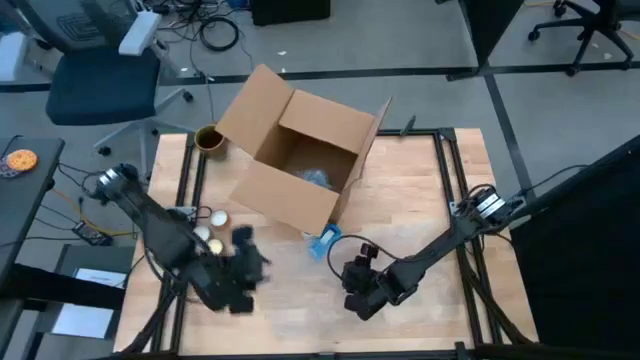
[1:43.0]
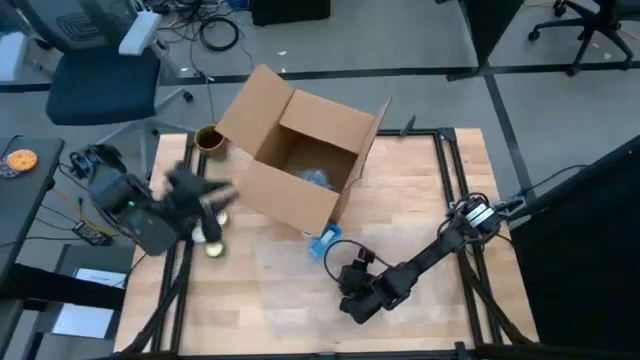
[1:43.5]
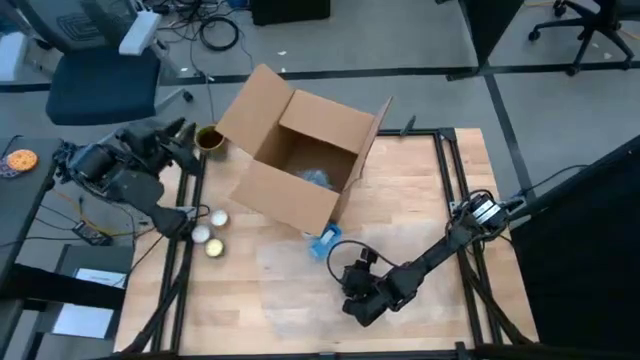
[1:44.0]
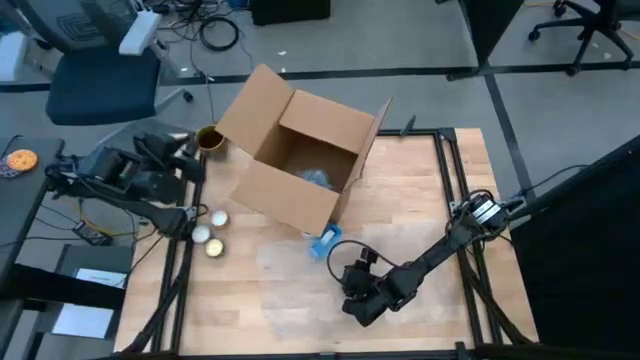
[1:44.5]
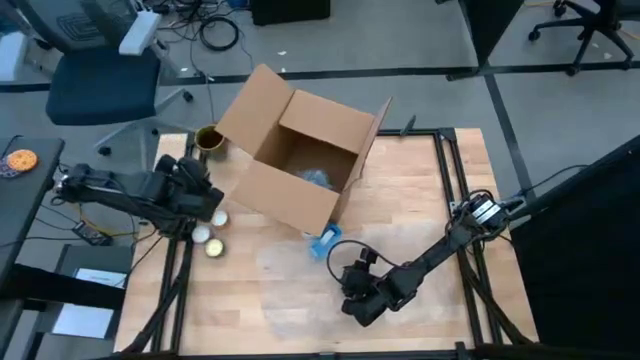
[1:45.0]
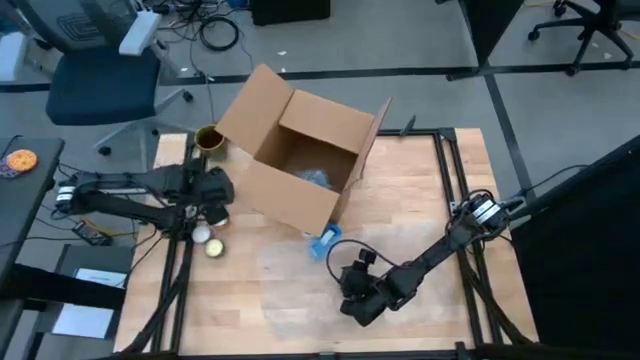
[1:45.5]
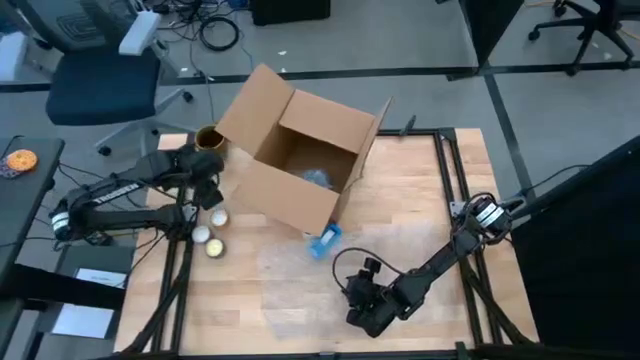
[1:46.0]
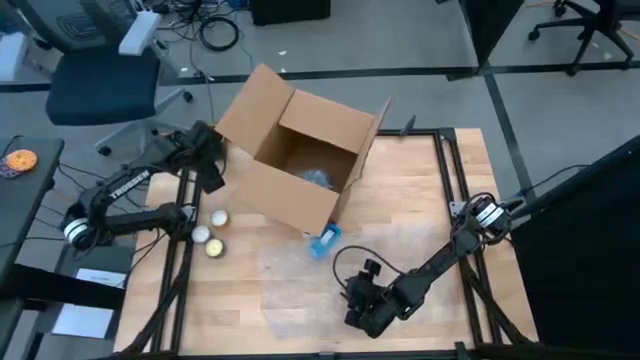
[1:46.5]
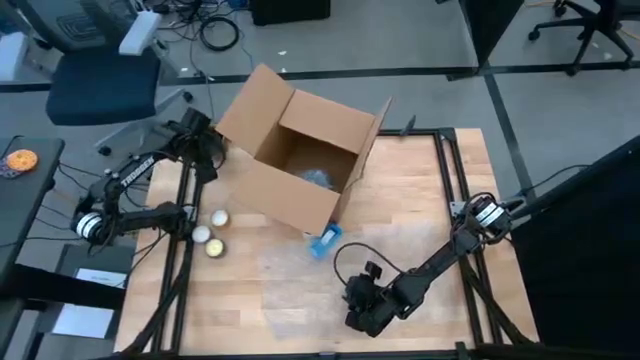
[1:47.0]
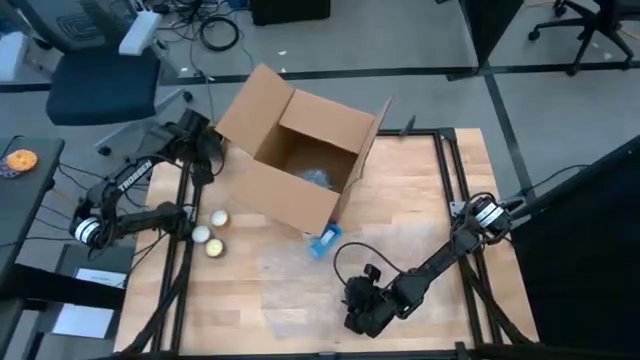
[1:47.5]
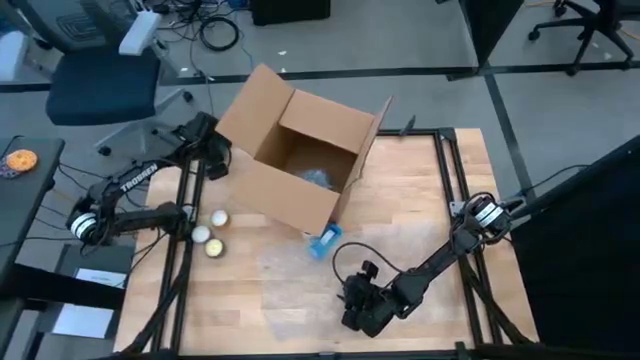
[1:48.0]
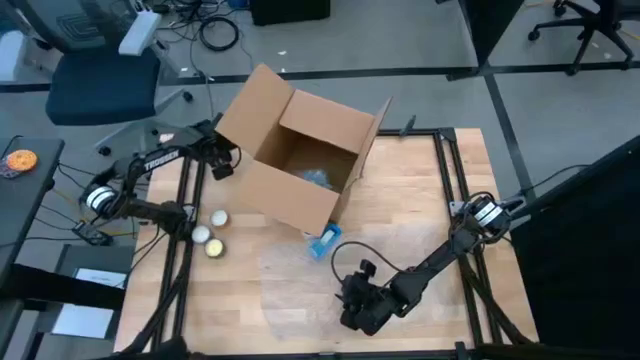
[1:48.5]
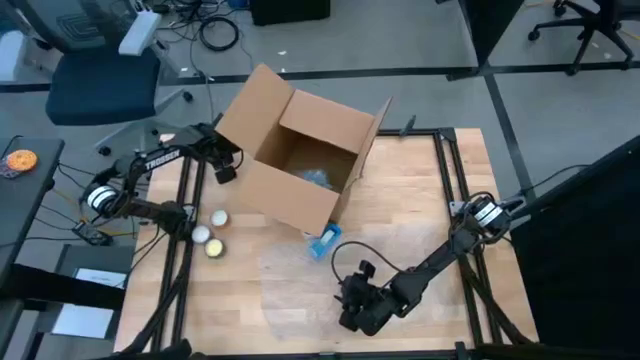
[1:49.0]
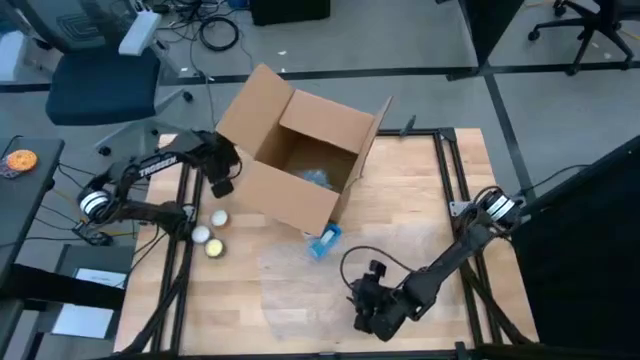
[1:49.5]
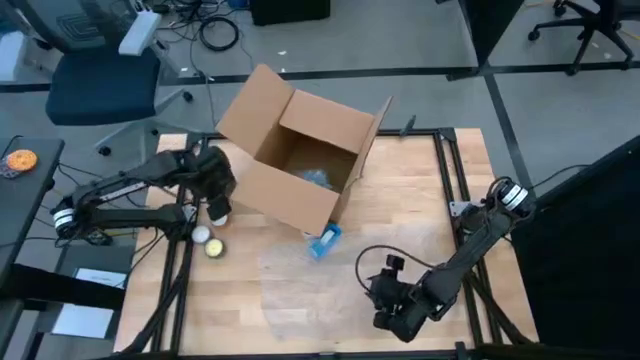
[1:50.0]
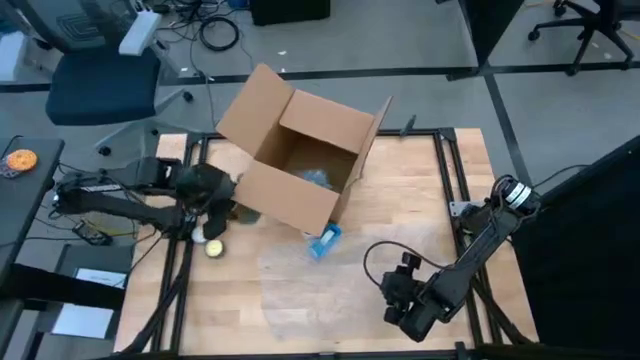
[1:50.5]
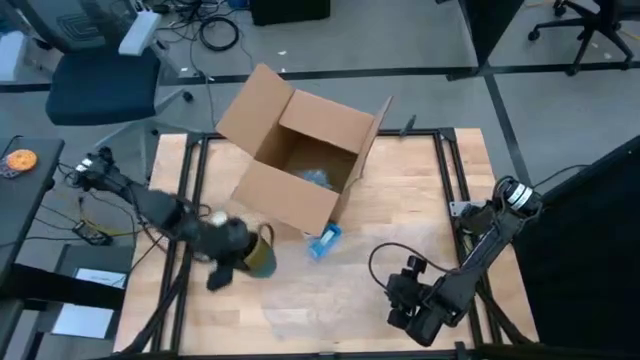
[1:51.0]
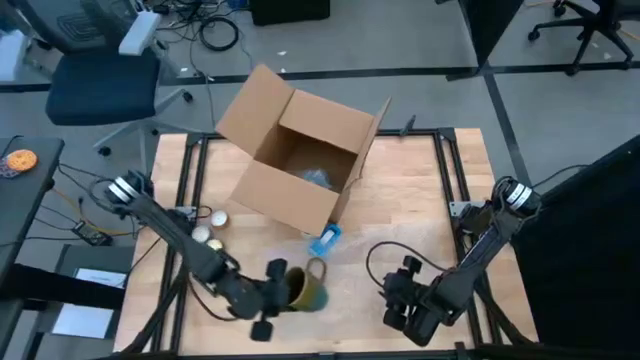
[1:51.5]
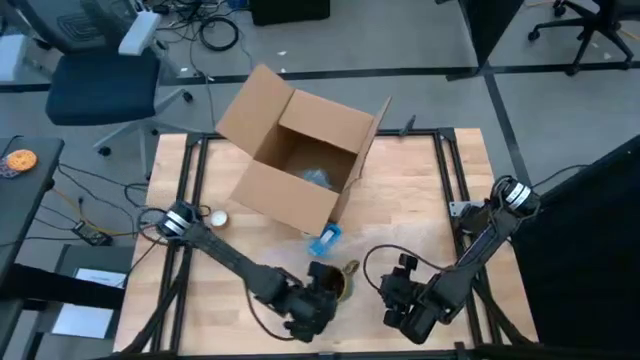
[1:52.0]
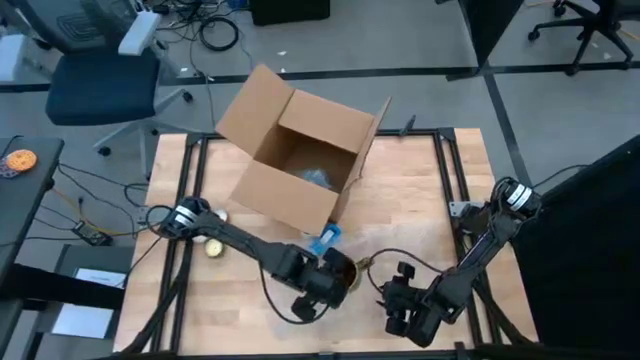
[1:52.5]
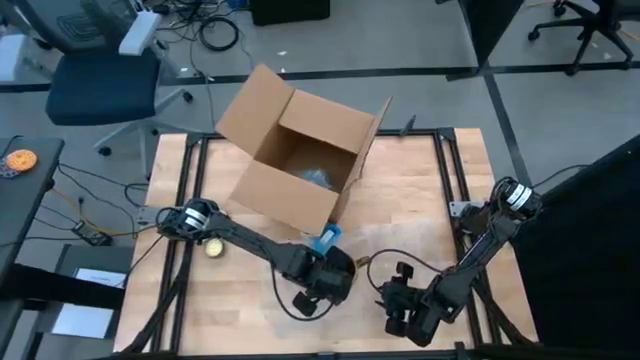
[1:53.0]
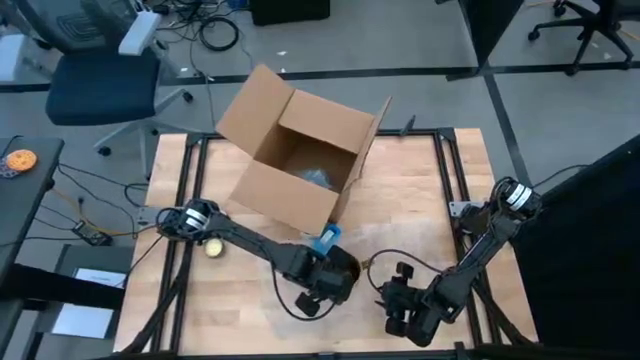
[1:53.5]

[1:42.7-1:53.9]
Task: wrap mug
Put the brown mug on top of the bubble wrap on the table

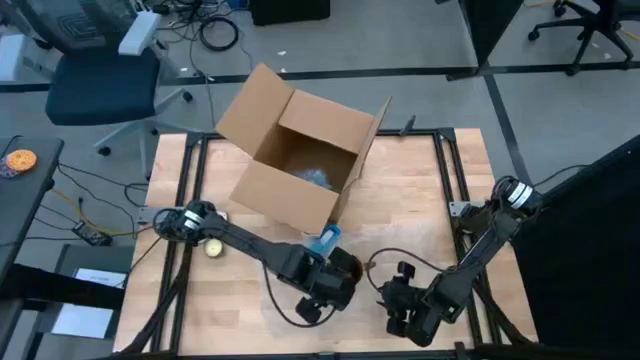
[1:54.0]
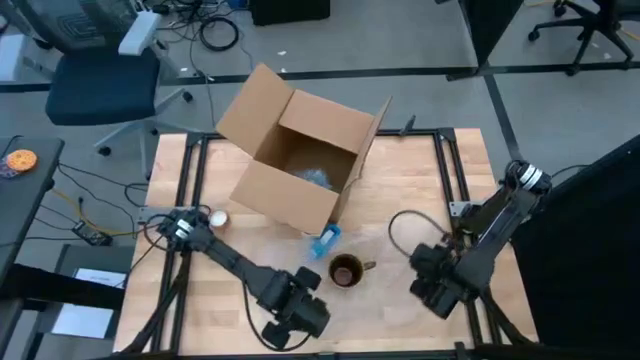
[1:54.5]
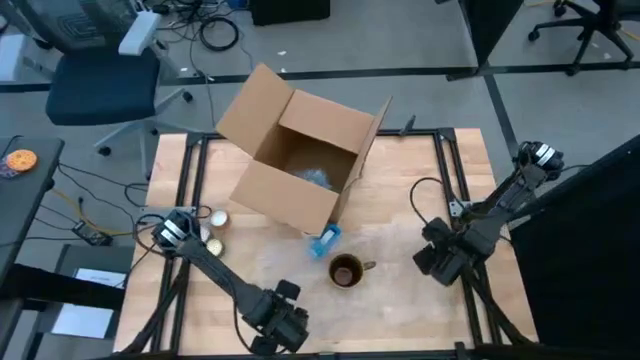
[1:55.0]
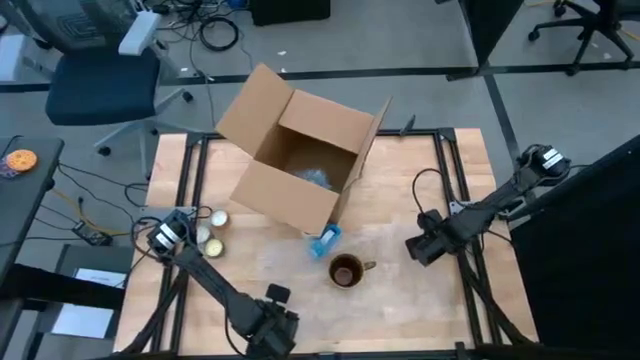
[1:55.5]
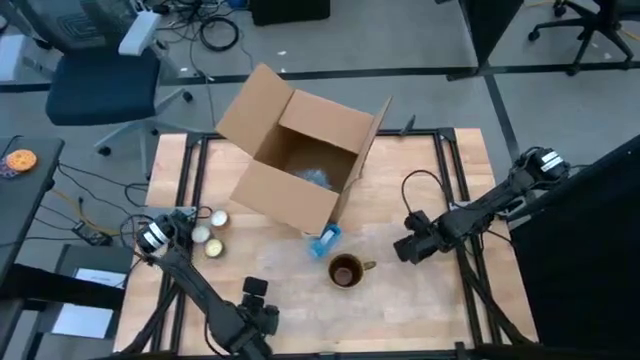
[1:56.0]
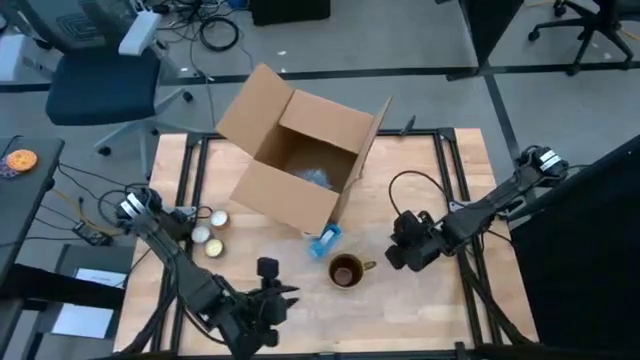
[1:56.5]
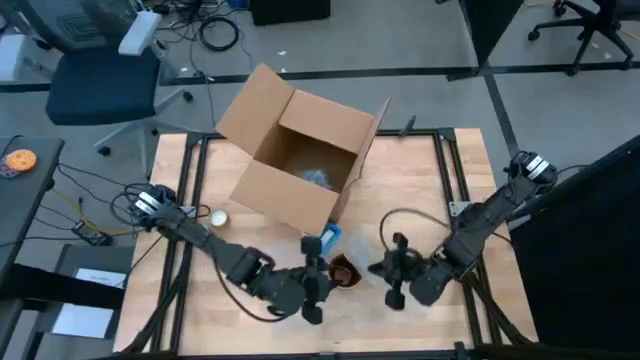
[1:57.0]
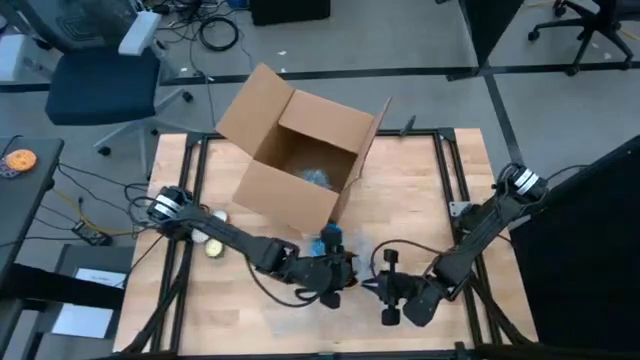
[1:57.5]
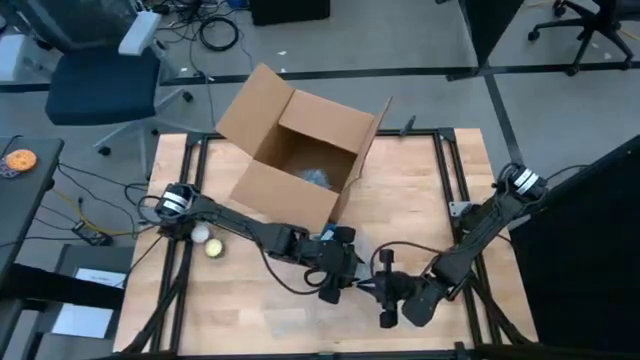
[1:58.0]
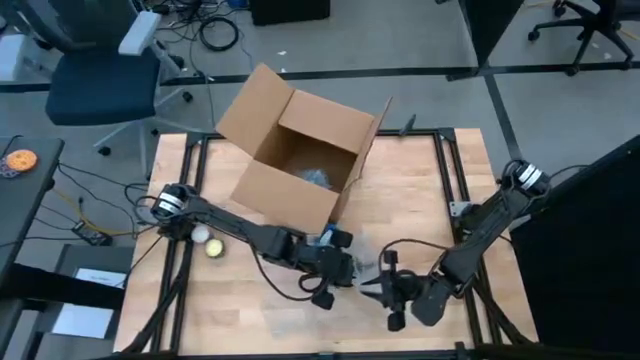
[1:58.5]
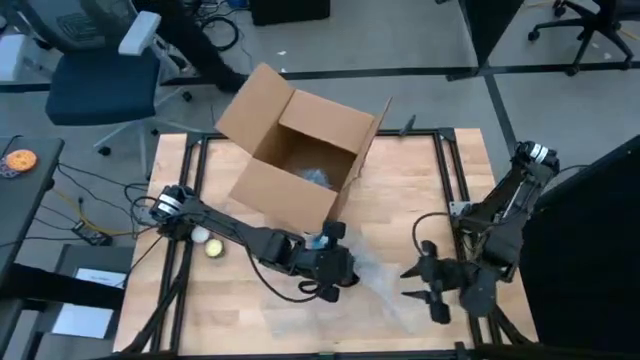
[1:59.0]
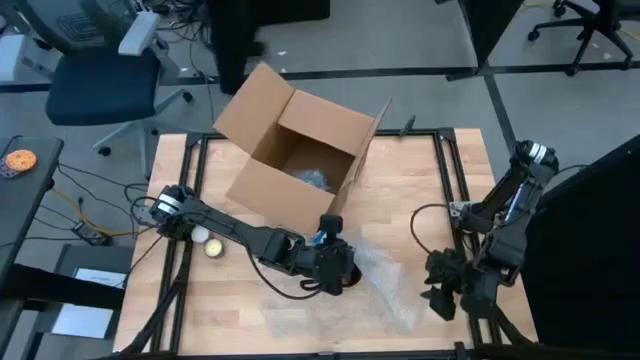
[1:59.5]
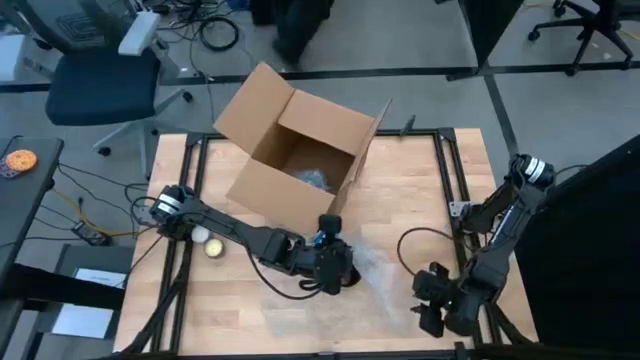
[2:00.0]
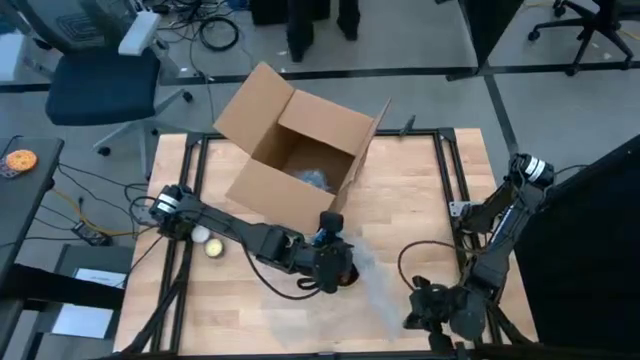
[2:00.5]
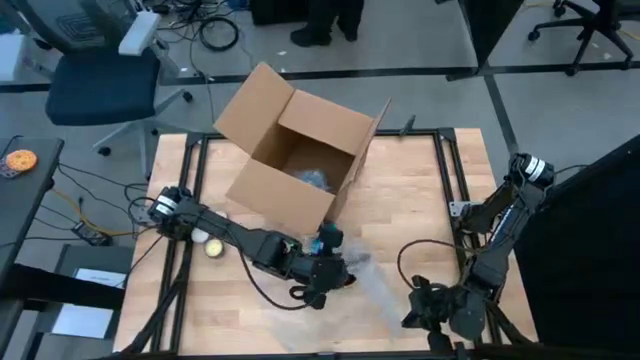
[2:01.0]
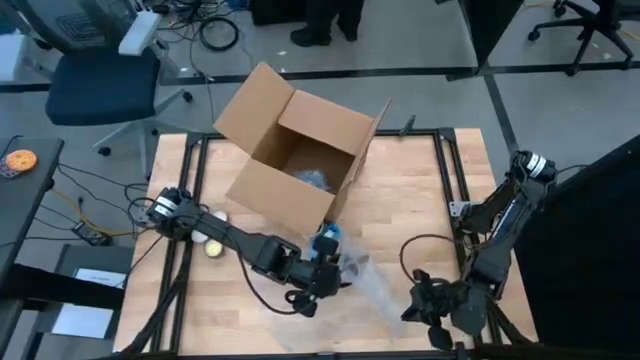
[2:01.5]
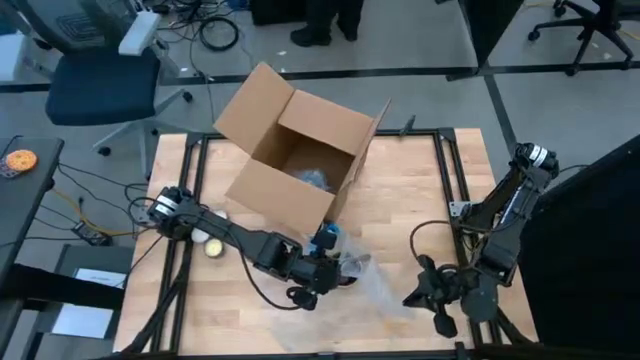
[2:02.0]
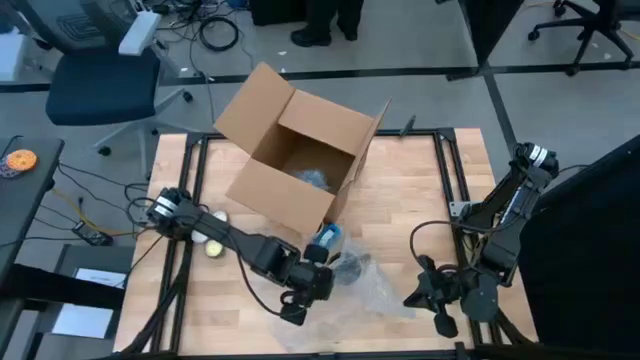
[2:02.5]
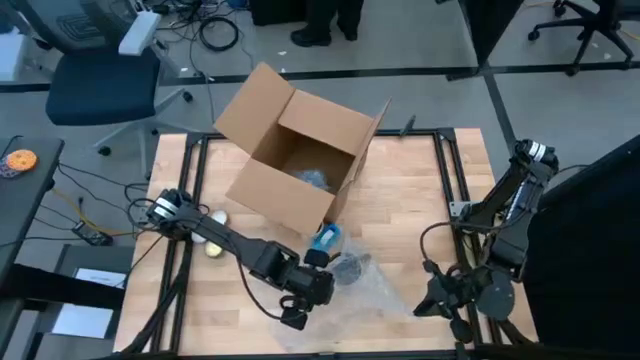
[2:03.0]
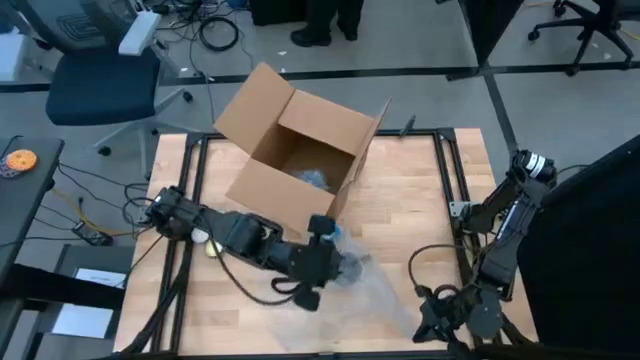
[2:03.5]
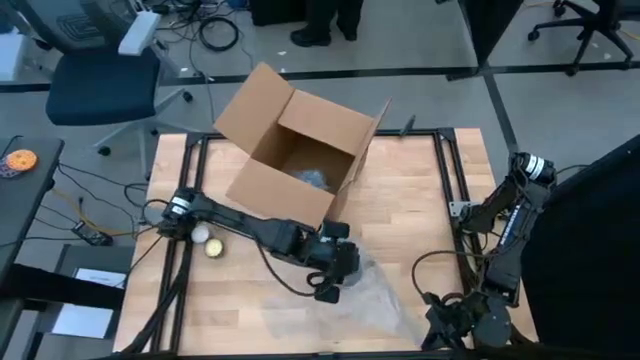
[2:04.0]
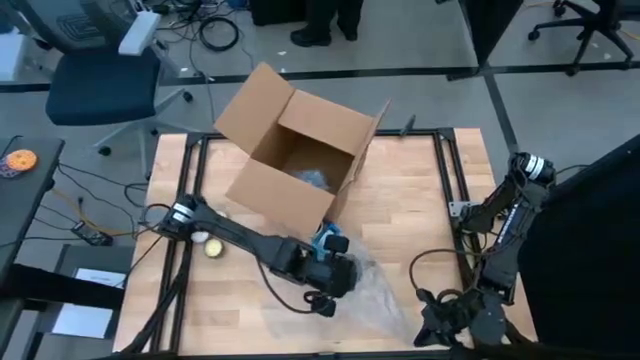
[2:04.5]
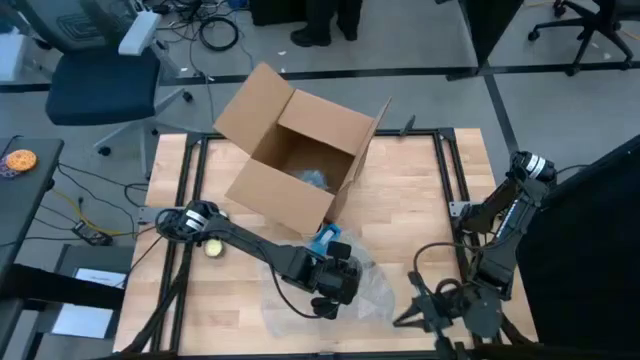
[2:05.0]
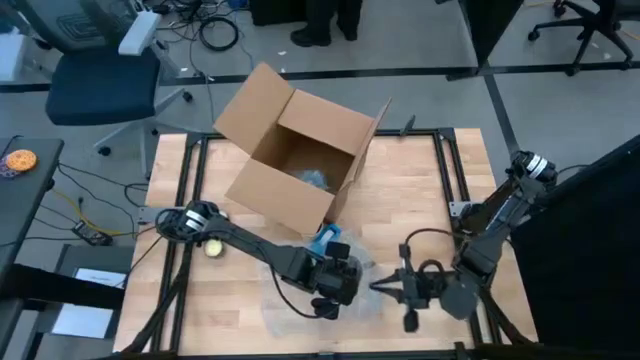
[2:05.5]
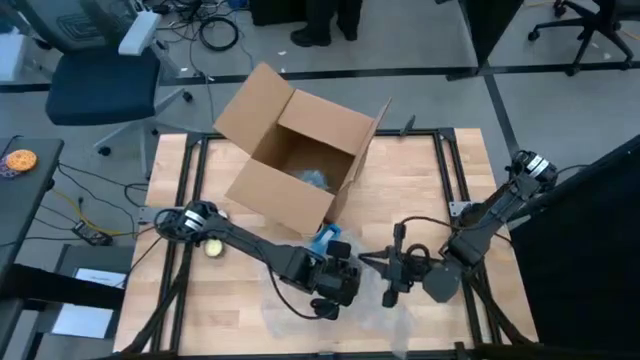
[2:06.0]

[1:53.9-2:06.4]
Wrap the brown mug with the bubble wrap on the table
